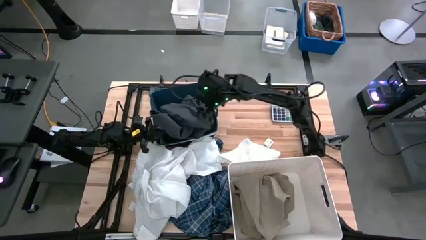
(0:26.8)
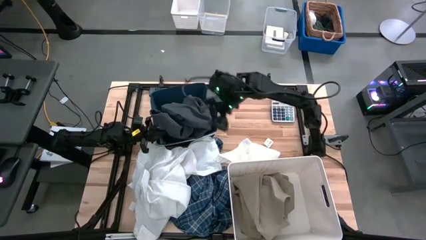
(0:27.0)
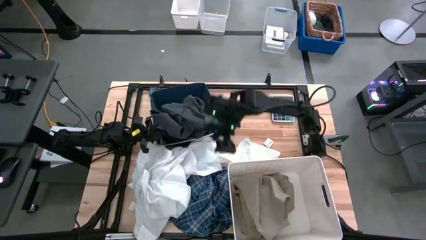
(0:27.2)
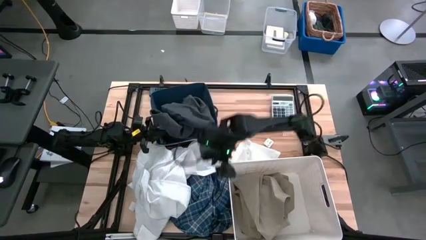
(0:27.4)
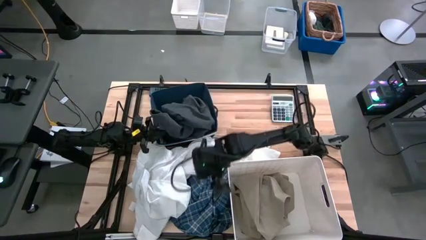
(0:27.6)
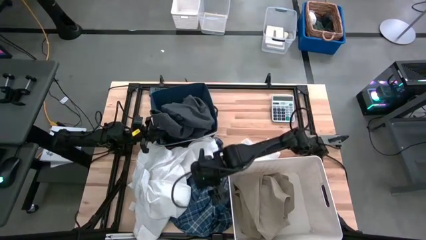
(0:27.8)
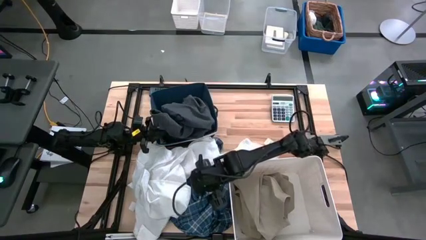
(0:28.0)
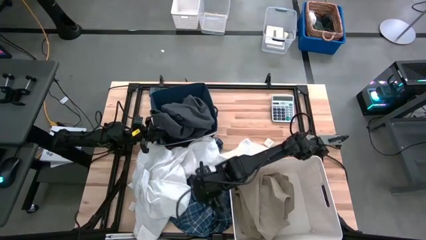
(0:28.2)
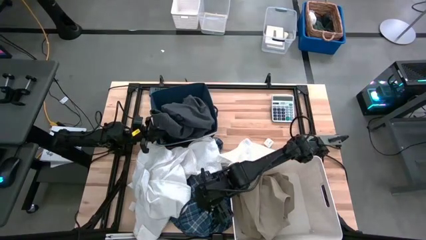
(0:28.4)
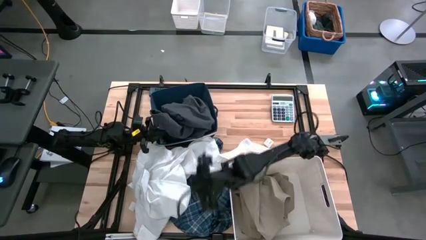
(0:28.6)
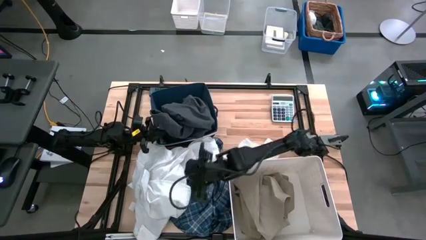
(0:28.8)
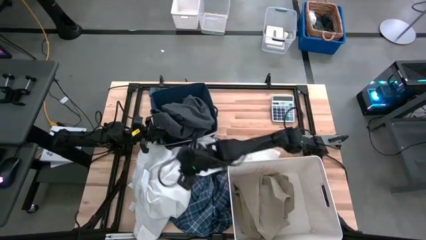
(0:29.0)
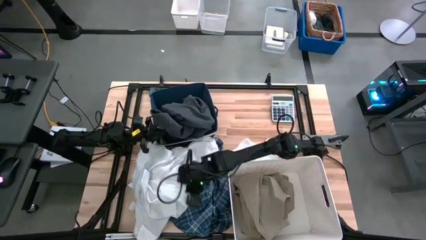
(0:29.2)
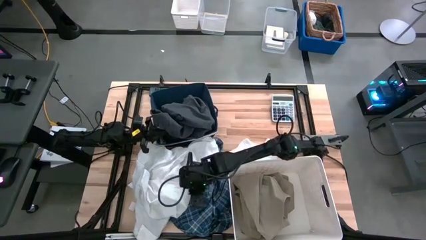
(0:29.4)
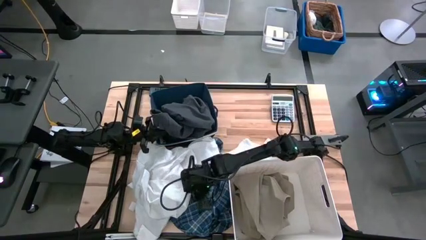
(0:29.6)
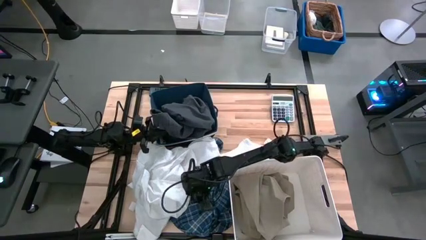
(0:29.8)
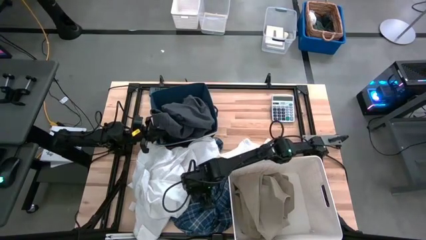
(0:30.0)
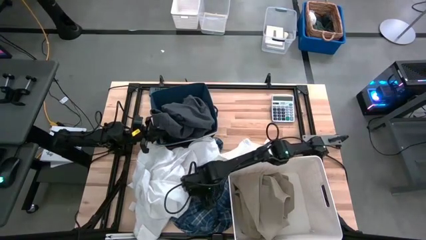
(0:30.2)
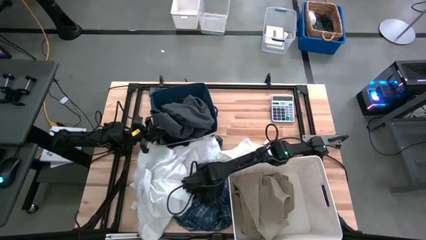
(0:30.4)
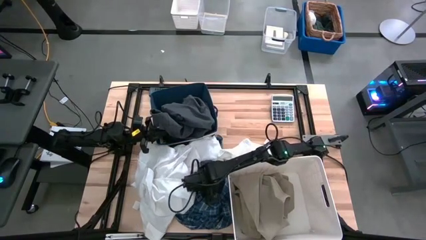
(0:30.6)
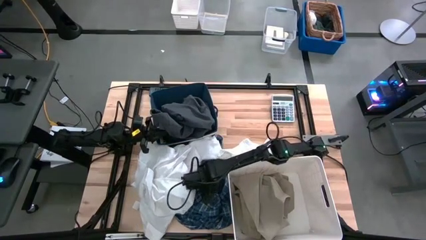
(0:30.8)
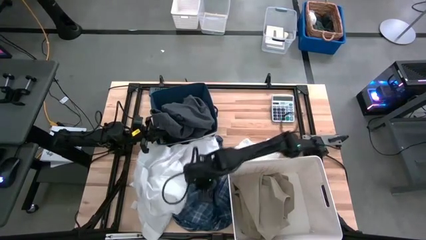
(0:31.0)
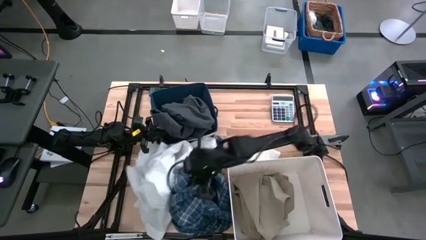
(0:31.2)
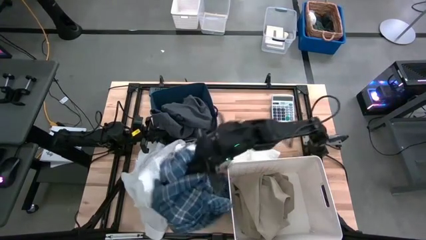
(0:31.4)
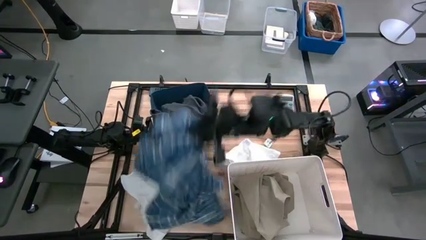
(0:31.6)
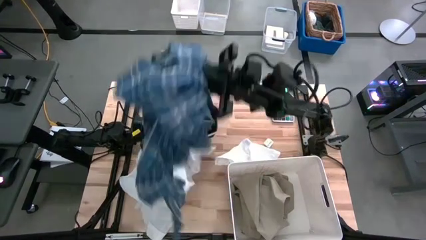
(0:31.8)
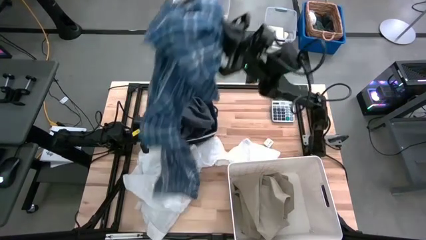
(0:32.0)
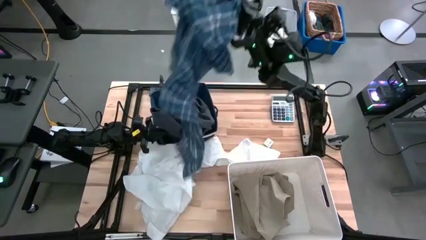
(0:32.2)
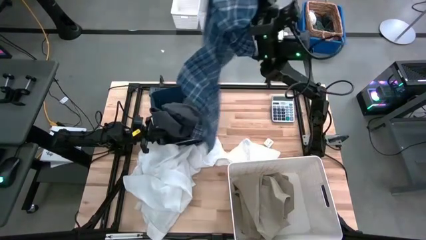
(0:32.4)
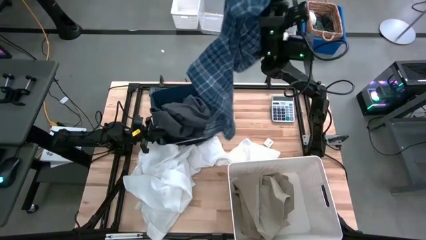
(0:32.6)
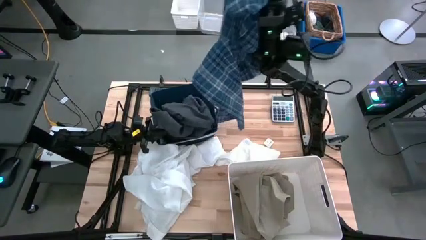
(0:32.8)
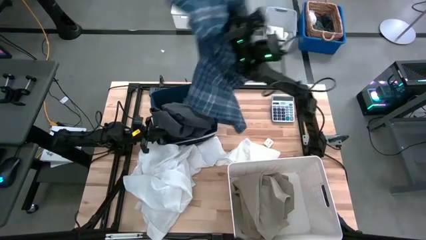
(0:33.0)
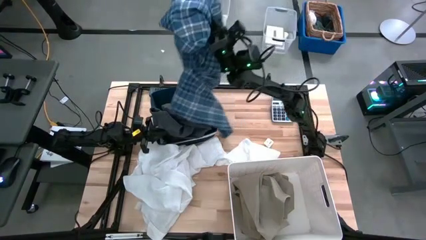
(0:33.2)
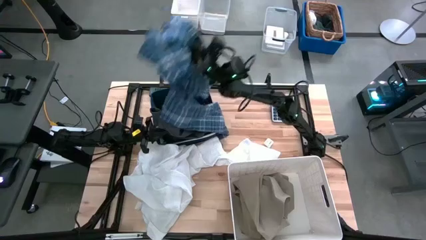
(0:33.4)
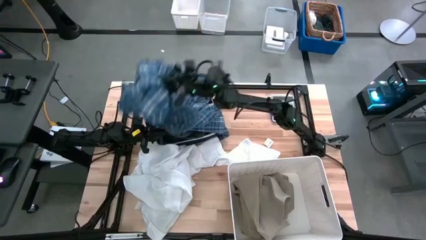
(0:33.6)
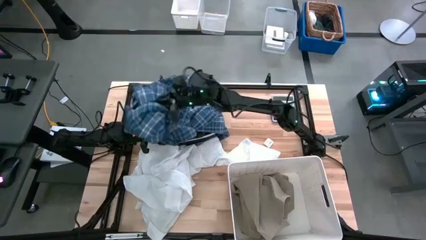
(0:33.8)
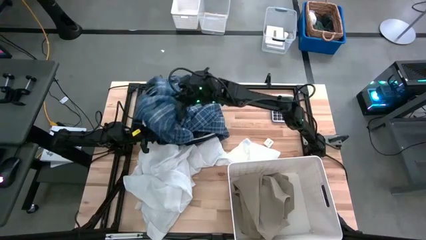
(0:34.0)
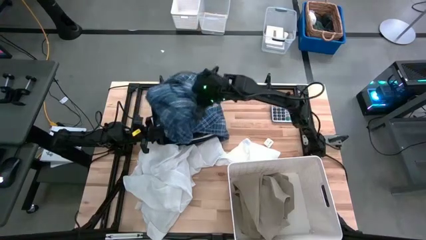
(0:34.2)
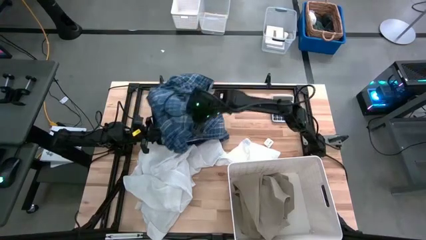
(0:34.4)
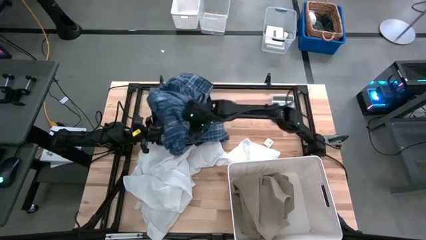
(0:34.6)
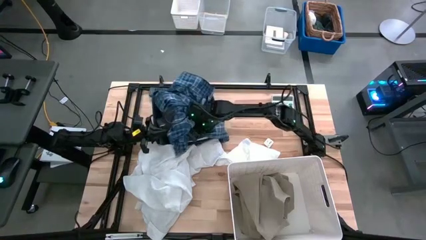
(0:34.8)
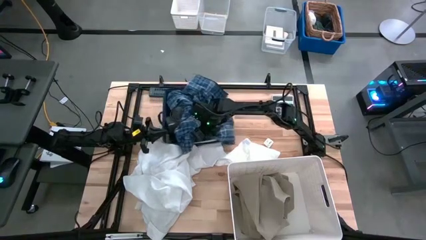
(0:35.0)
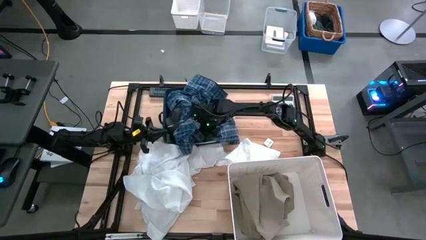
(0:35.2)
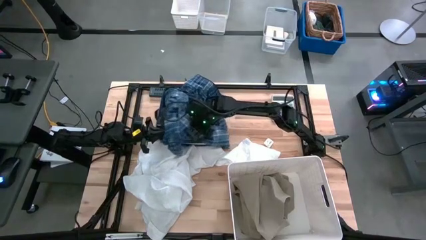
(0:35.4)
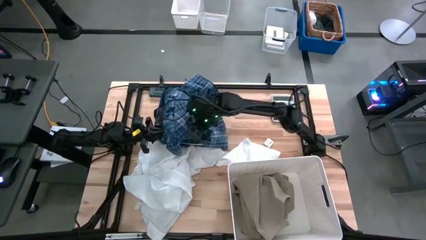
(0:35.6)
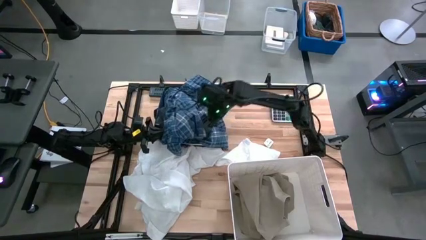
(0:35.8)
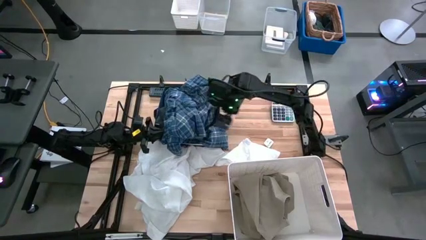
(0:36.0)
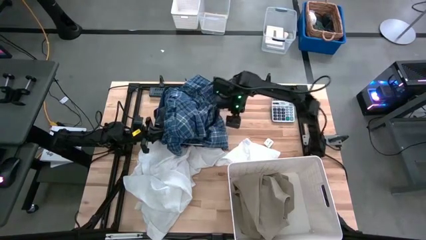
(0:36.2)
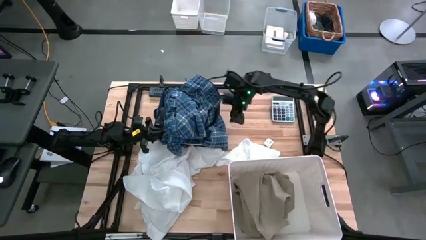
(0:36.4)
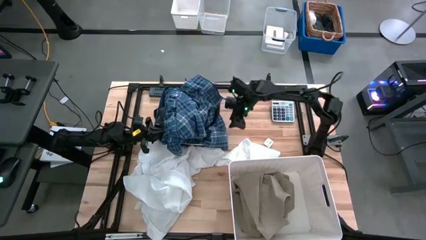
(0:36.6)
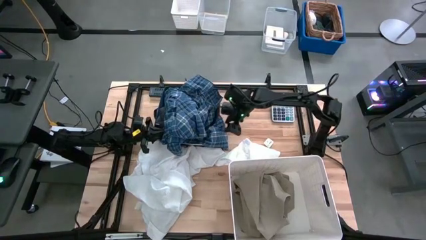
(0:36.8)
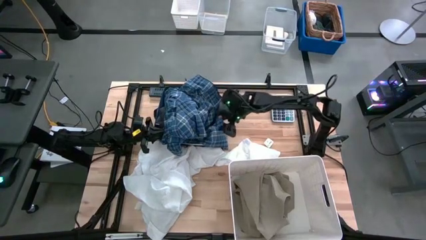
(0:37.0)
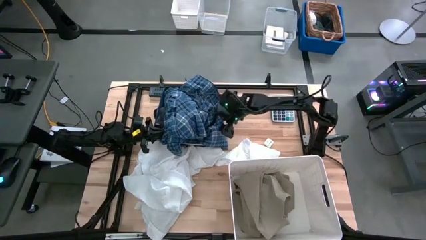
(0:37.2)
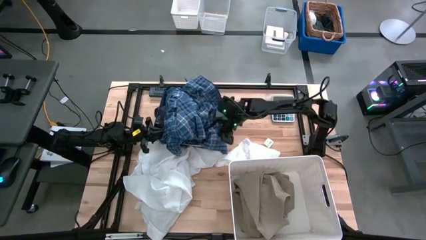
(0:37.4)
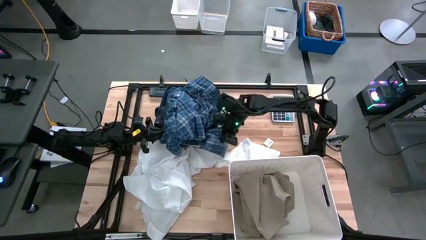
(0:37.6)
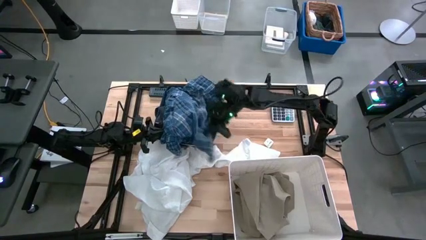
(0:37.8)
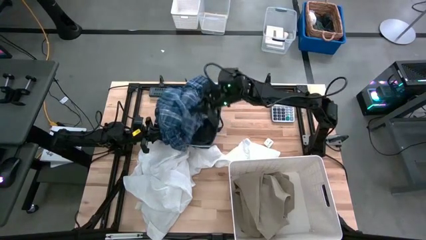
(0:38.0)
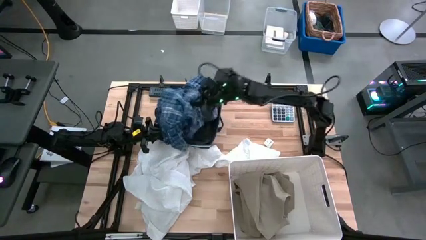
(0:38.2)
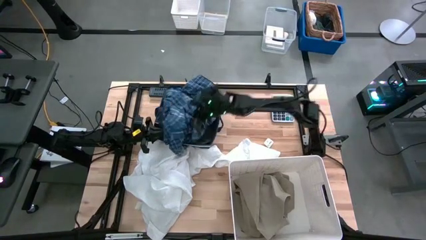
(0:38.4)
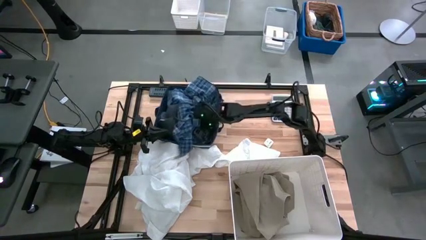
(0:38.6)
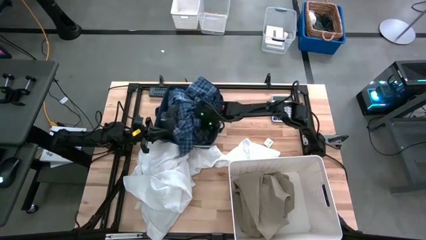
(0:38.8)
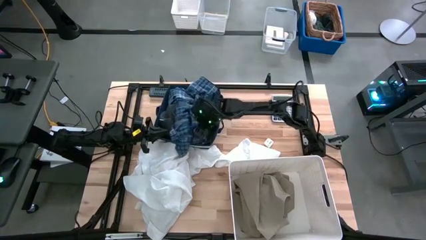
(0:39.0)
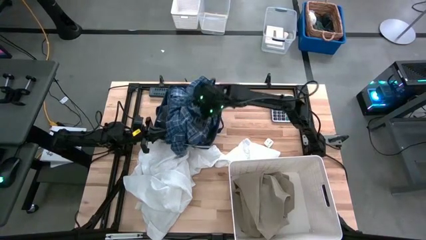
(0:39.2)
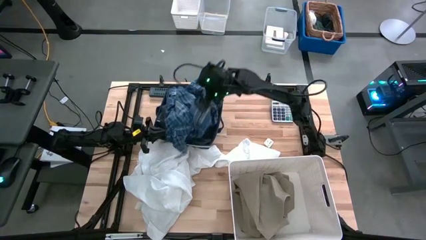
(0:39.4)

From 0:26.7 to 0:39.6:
Task: Sort clothes
Put the blue checkered pants into the blue laundry bin

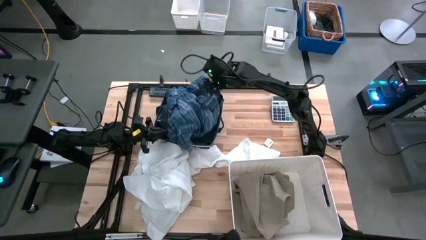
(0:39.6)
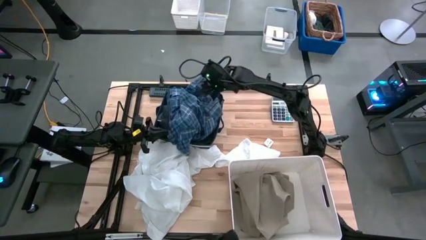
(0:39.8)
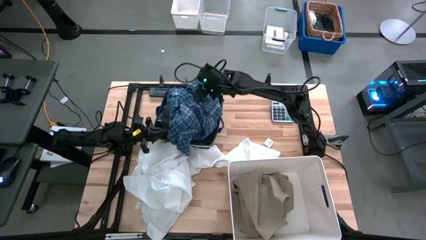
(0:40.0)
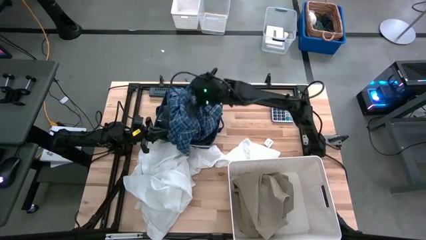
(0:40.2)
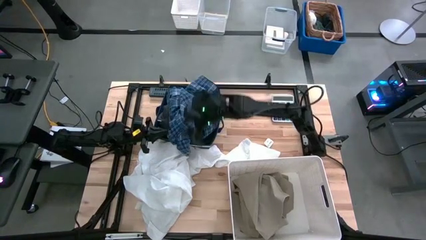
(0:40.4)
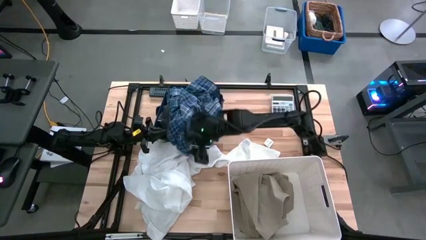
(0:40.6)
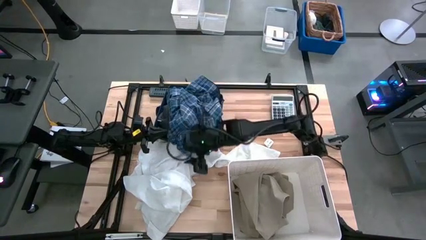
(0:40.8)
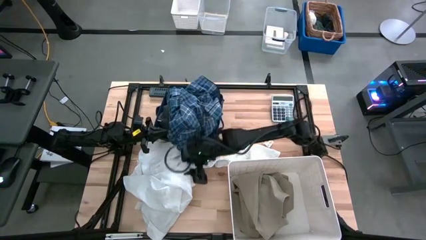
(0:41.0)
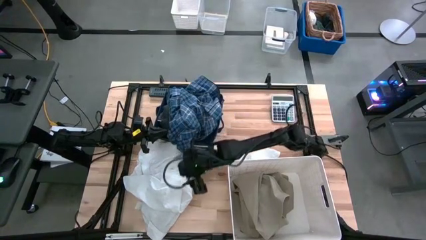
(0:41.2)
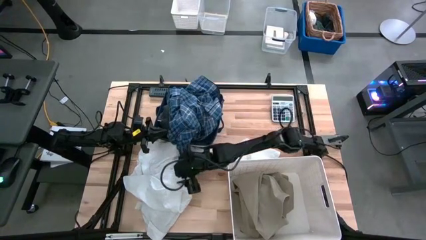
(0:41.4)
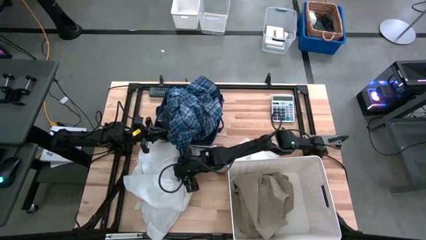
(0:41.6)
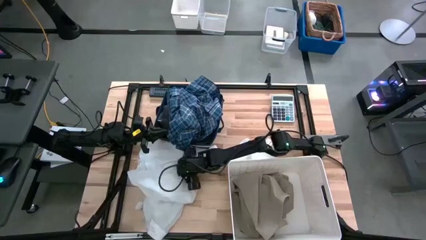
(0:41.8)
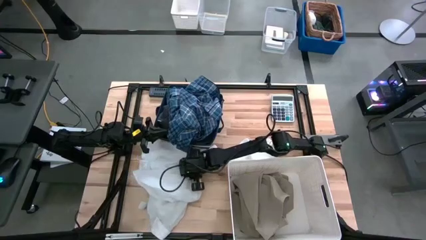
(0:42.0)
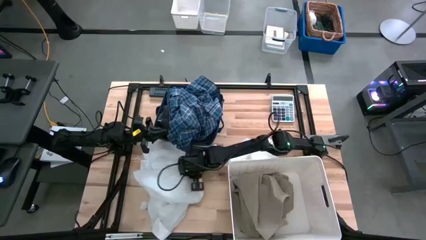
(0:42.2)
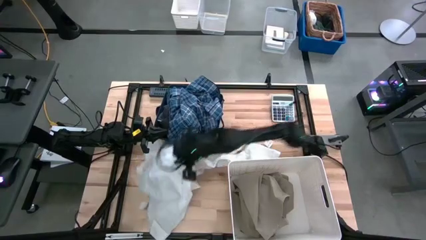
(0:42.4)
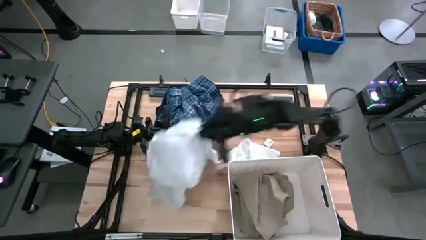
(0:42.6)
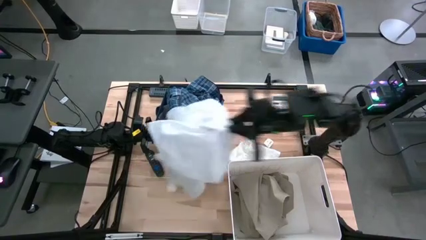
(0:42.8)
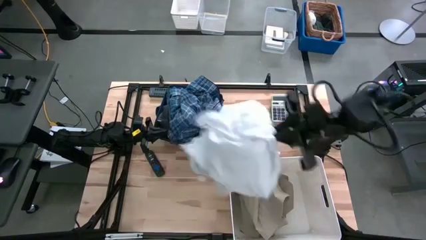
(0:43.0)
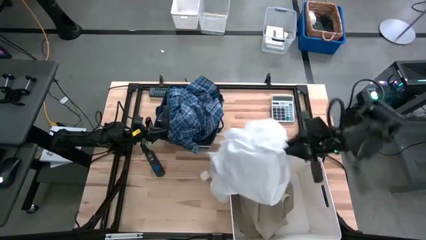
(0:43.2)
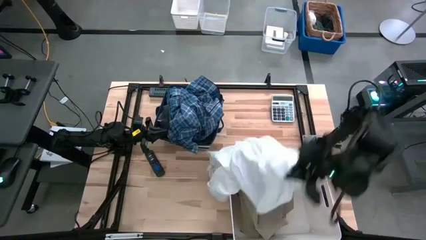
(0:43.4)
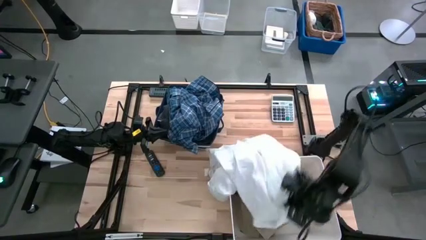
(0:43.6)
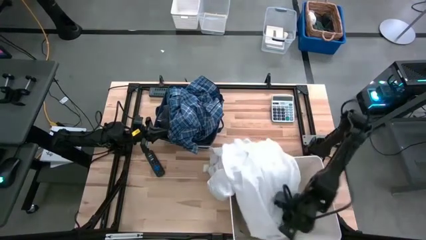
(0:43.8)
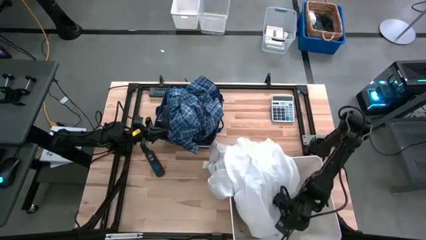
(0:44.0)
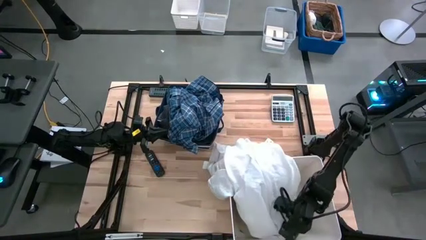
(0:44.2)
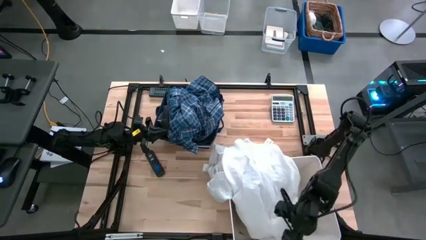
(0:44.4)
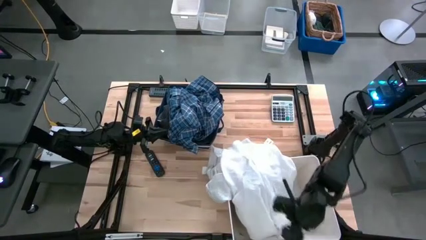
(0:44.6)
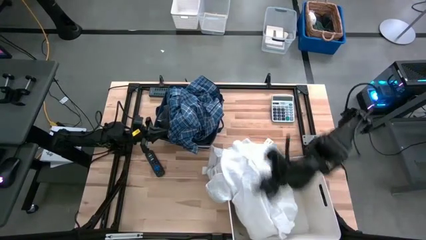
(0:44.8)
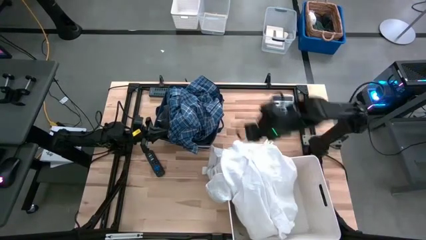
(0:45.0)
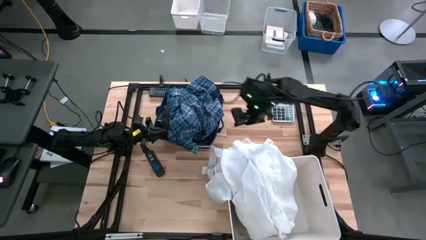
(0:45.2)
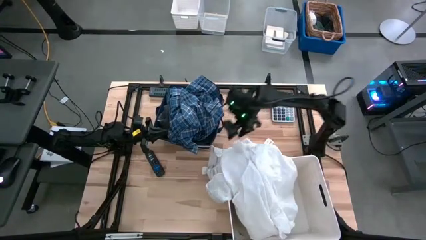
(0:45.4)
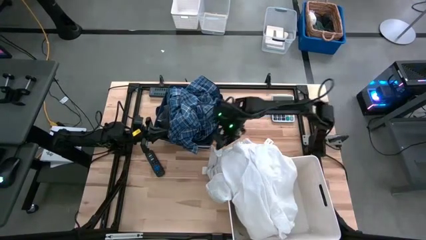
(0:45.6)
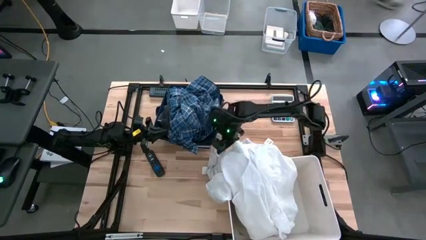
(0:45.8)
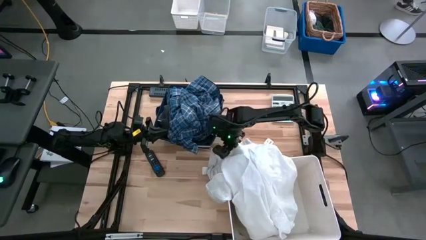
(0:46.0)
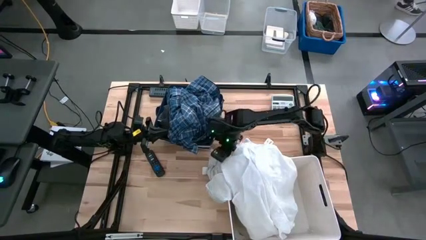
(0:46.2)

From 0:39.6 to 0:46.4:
Put the white long sleeve shirt into the white laundry bin
